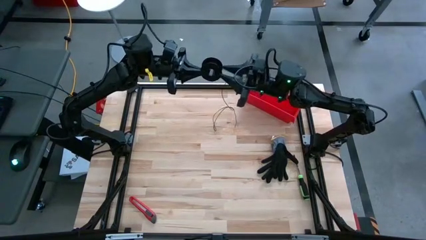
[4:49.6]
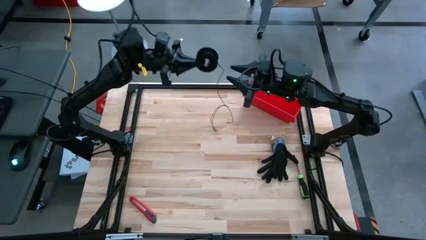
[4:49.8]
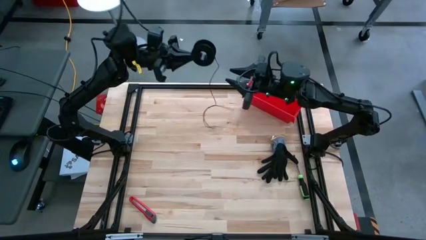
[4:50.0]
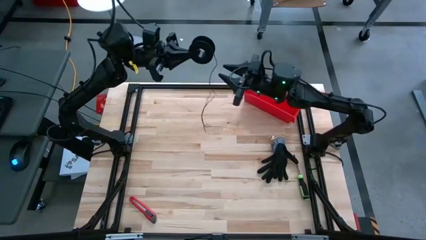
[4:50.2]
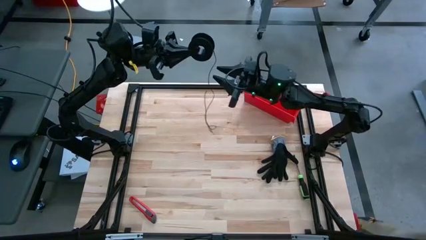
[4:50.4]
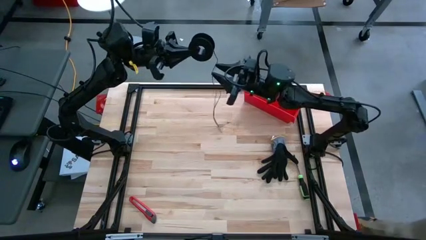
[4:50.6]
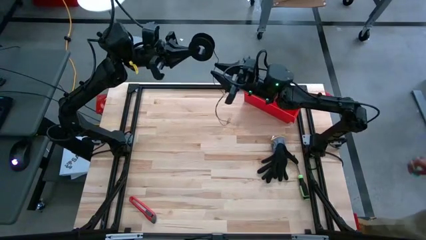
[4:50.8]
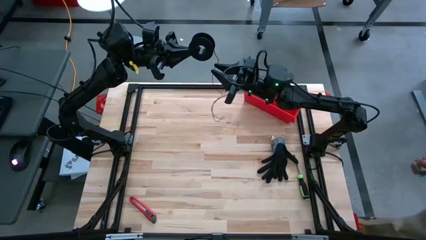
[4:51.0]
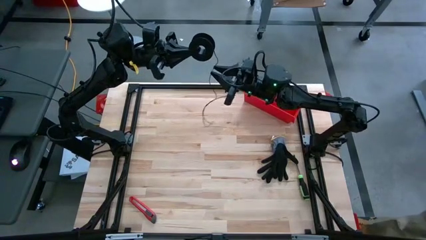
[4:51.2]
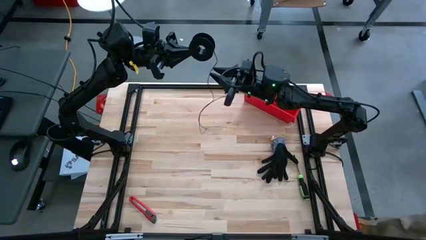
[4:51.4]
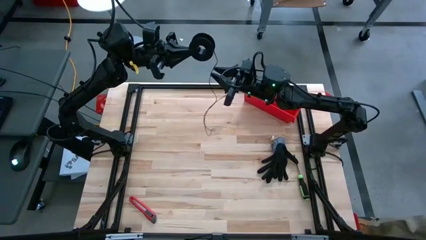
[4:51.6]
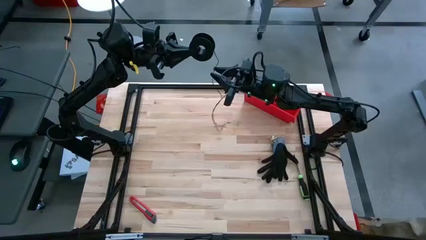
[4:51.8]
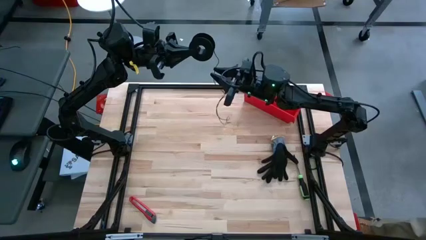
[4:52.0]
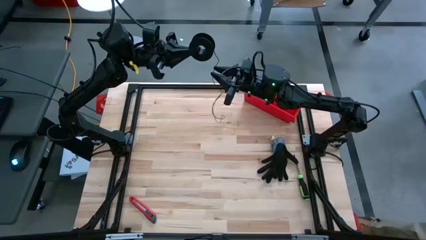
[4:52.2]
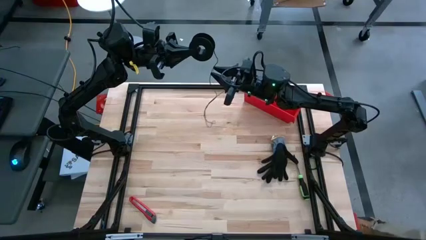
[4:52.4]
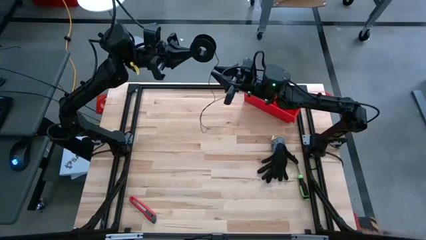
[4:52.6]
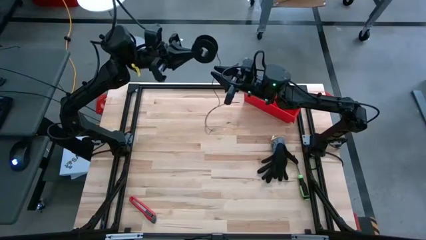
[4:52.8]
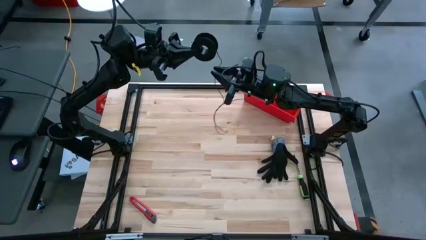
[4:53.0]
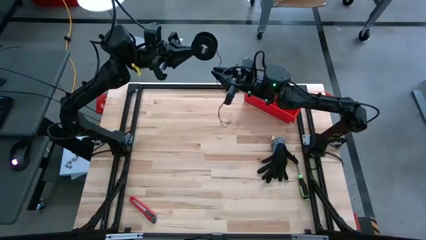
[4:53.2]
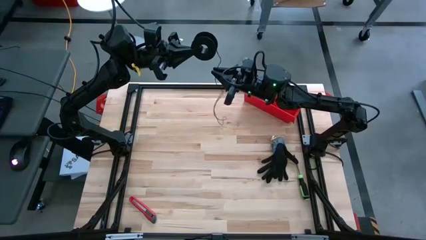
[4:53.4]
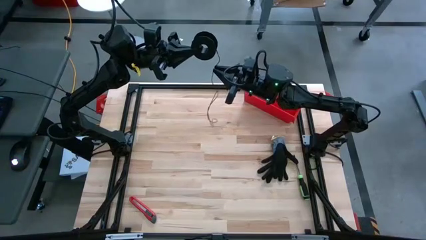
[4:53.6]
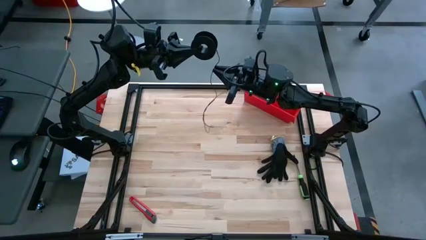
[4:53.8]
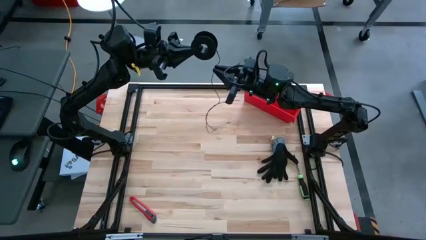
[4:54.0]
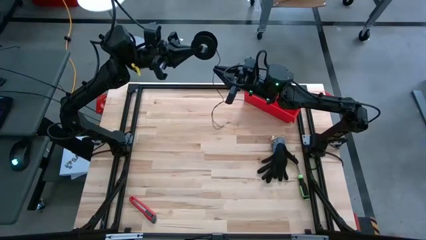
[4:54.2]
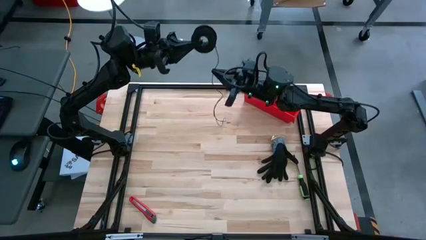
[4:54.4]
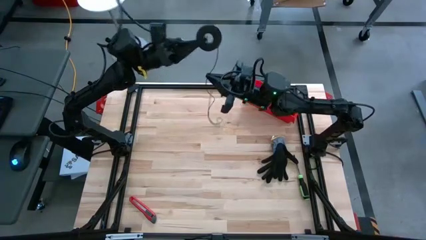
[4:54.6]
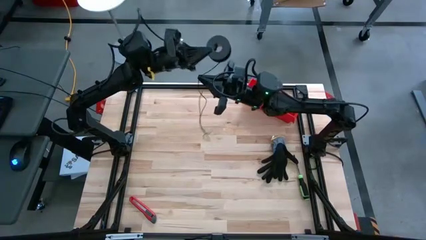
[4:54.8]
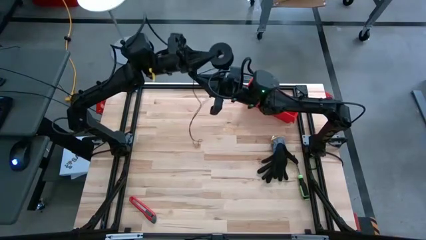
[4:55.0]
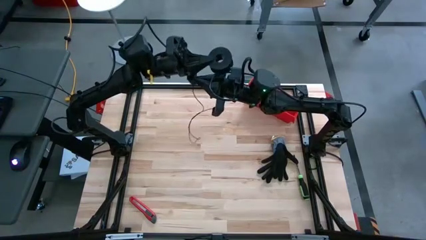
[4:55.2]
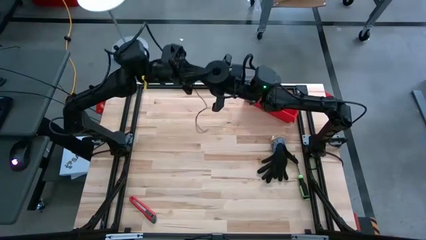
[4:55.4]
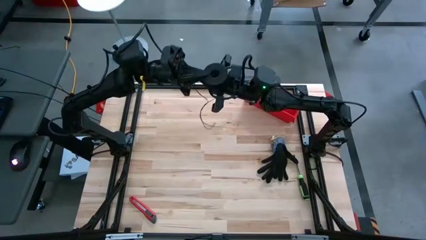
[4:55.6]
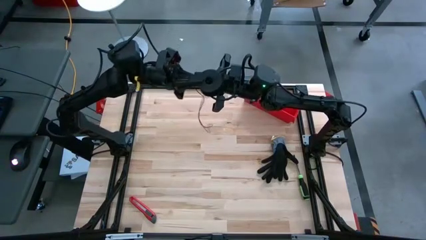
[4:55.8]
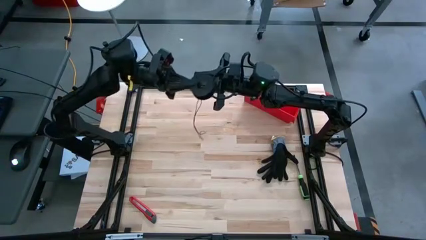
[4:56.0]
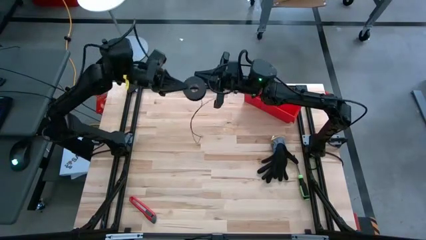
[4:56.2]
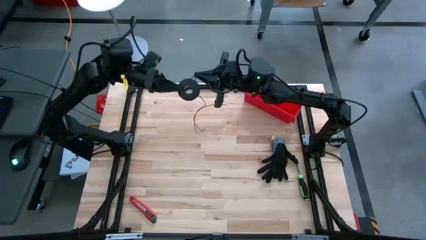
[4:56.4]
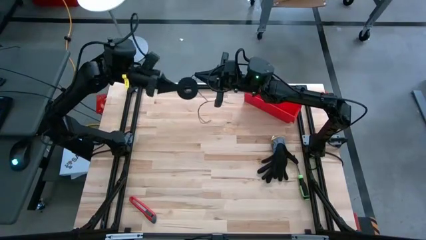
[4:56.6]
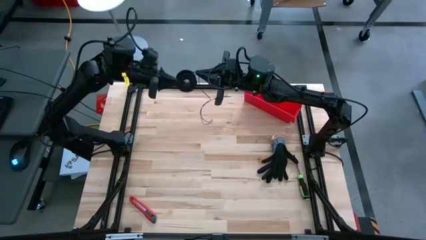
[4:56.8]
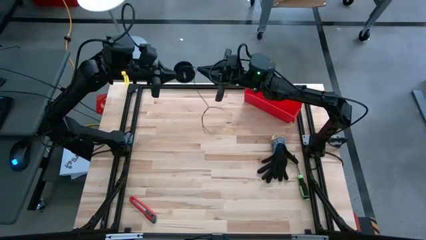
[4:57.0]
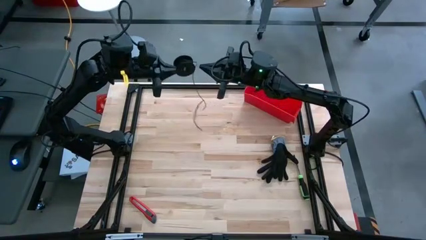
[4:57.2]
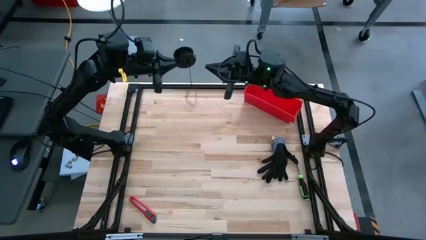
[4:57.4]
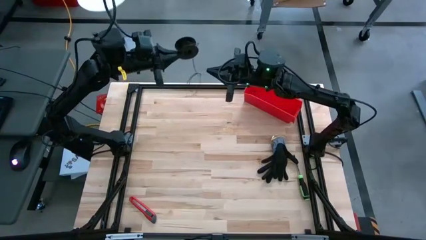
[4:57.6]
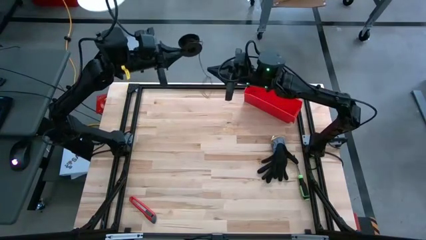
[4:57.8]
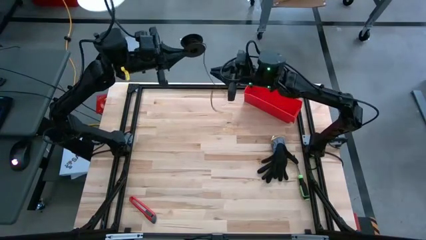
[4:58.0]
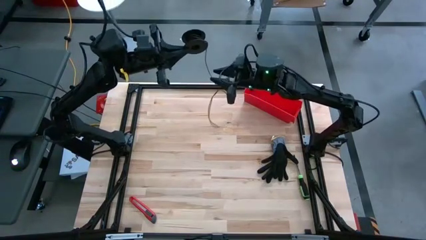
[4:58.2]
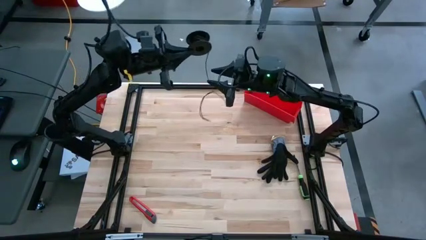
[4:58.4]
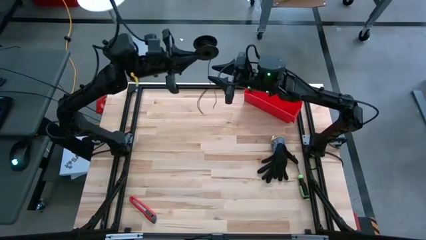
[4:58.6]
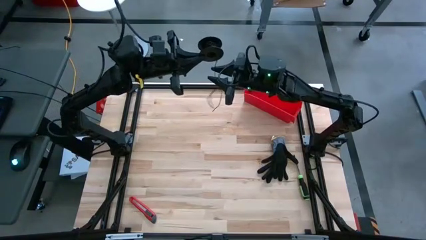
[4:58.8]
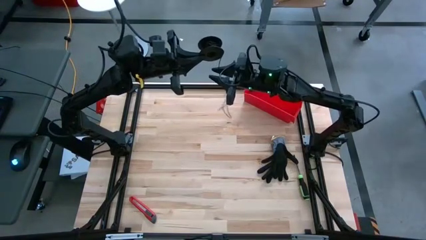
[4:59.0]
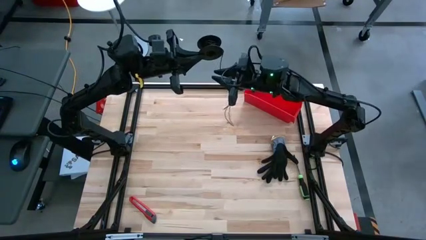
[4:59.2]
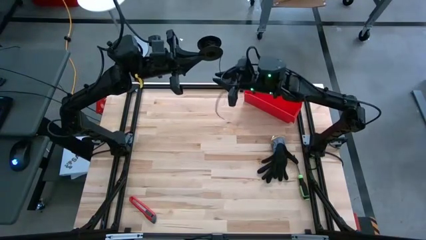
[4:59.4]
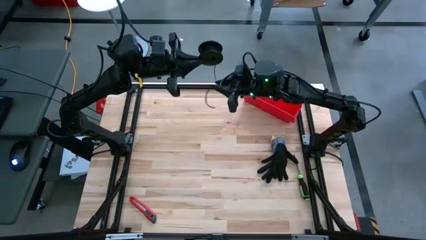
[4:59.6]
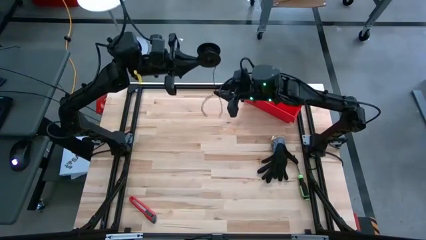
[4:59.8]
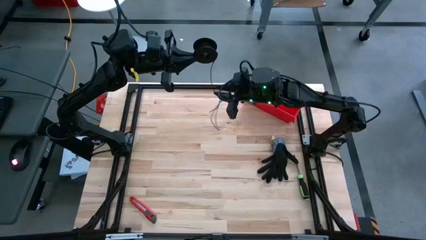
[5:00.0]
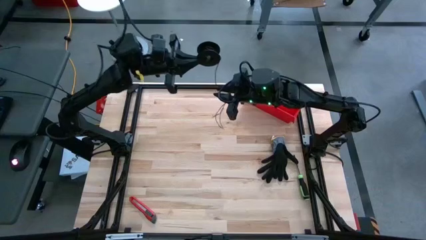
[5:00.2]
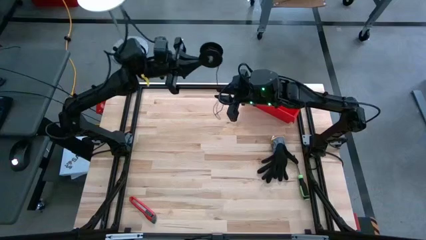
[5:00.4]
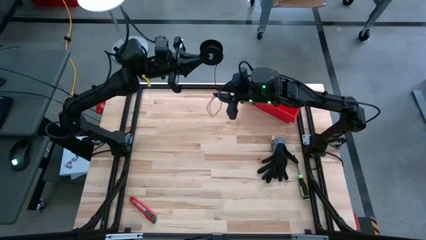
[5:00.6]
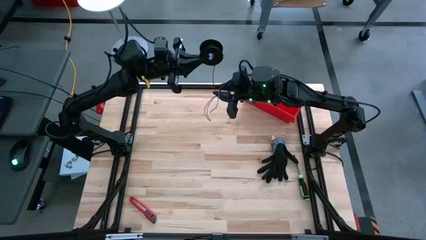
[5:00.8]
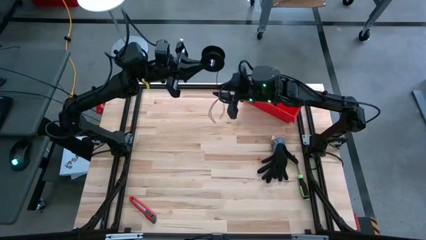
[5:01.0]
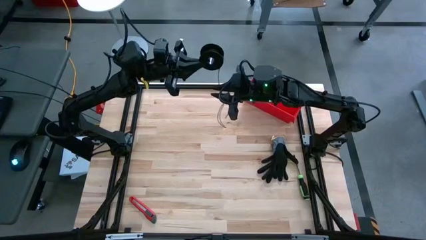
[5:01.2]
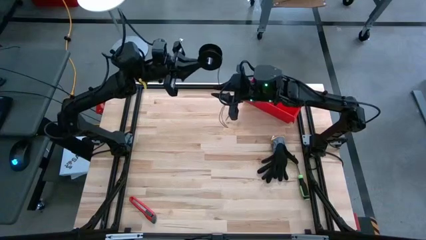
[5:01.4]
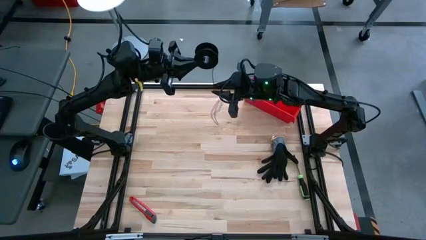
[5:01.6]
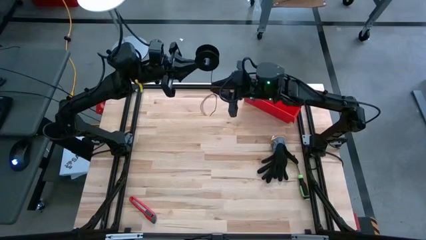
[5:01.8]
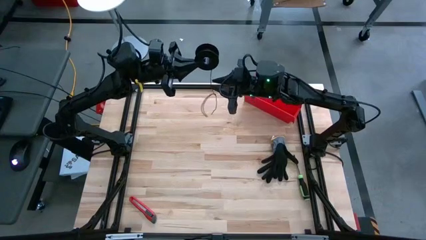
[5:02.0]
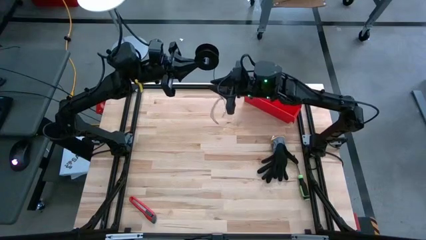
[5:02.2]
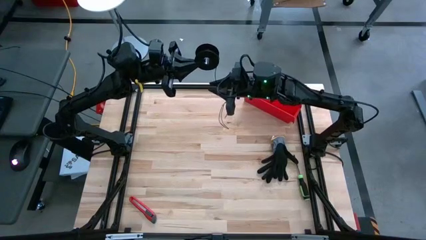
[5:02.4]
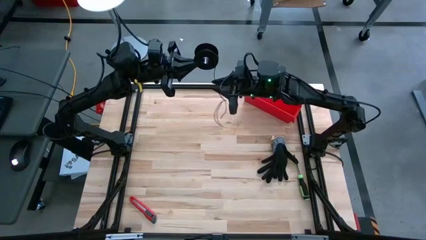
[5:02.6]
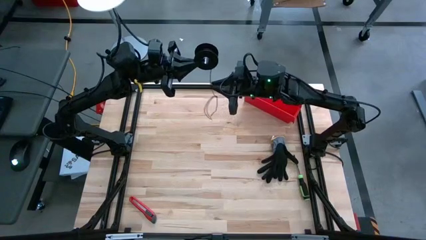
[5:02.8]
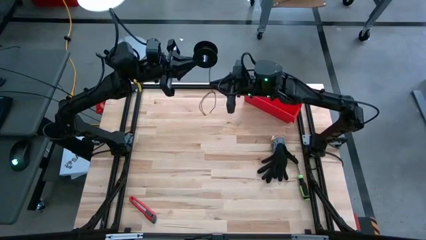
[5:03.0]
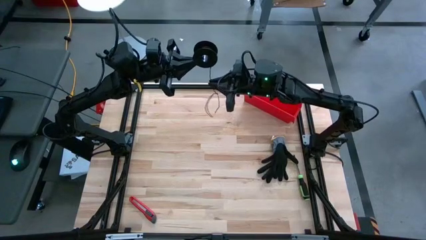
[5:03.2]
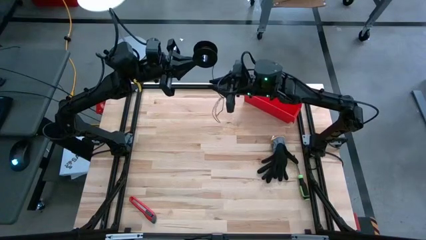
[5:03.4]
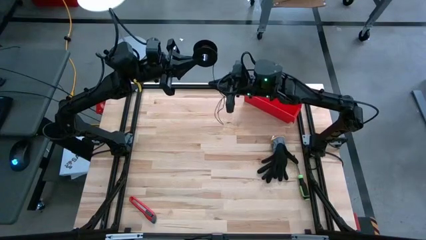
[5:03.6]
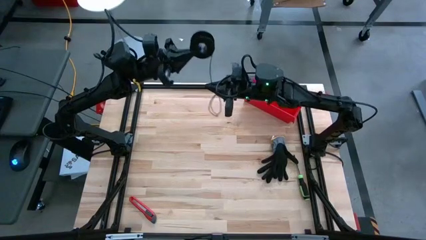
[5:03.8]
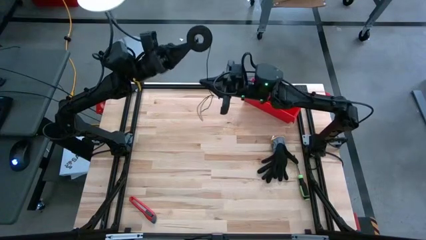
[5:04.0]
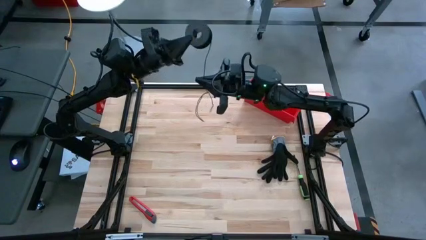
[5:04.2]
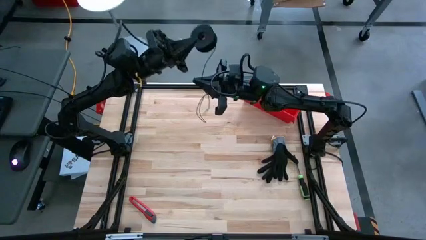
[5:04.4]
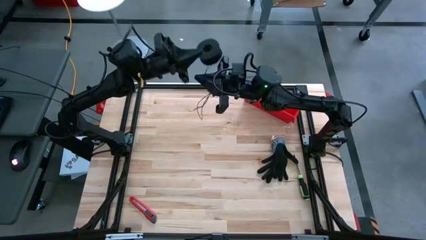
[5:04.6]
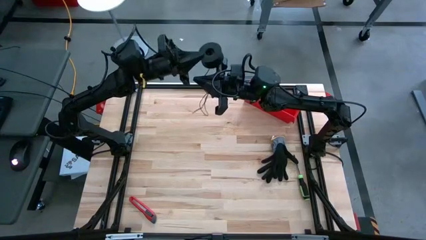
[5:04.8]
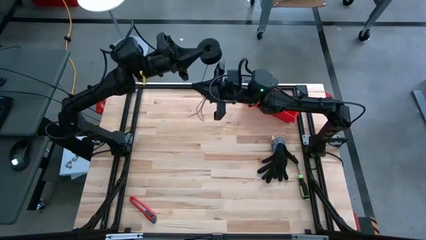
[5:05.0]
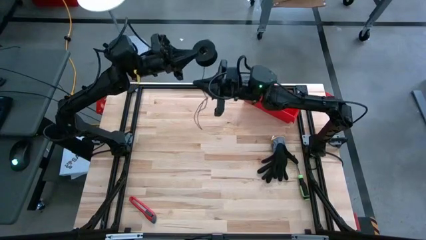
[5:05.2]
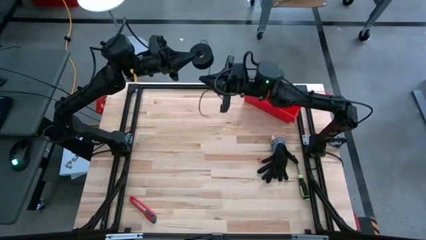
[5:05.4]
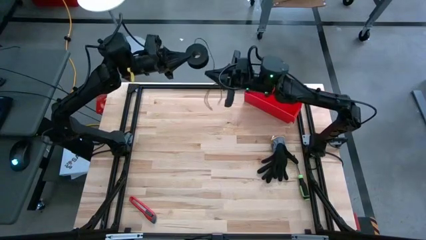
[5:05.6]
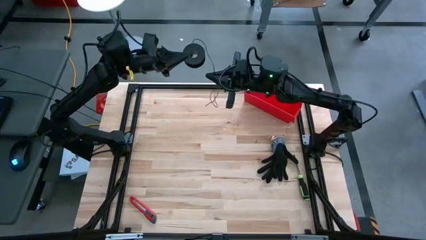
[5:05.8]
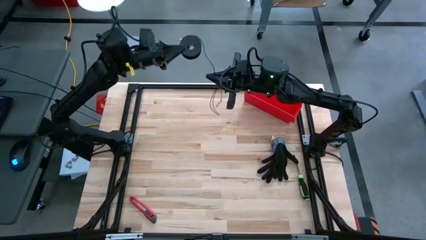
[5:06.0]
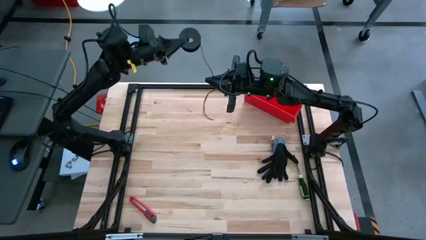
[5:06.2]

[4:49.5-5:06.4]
Task: Coil cords
Coil the black wire on the spool
